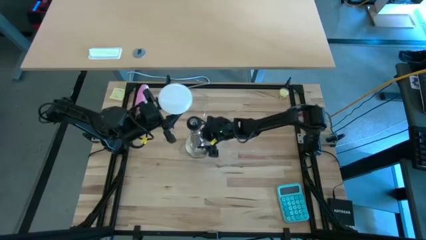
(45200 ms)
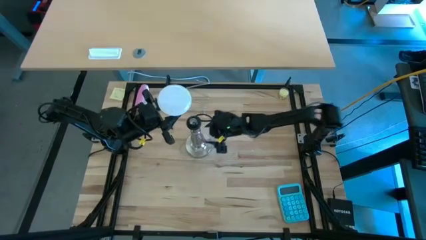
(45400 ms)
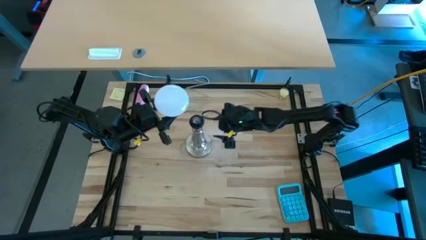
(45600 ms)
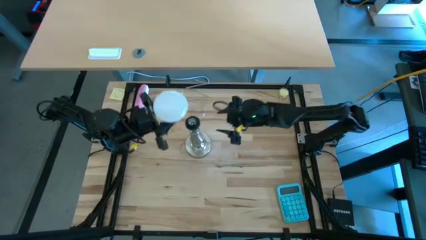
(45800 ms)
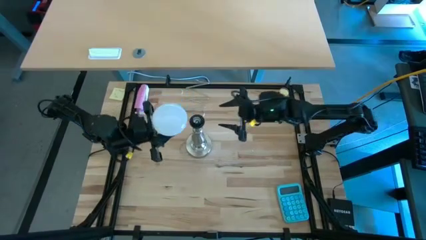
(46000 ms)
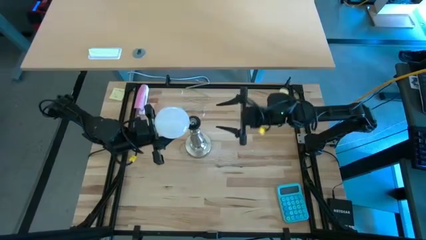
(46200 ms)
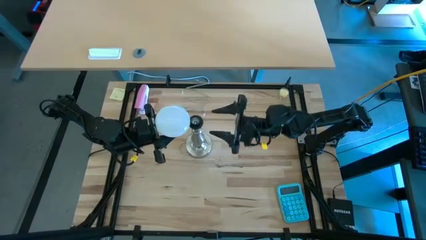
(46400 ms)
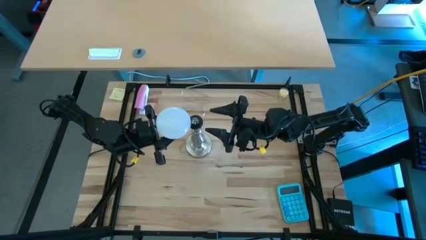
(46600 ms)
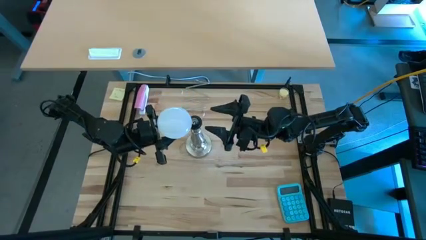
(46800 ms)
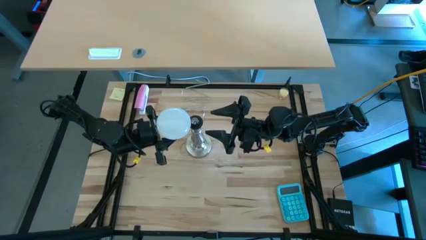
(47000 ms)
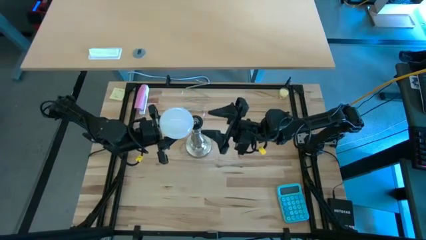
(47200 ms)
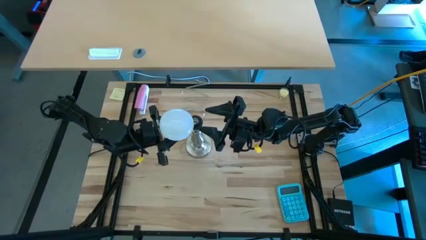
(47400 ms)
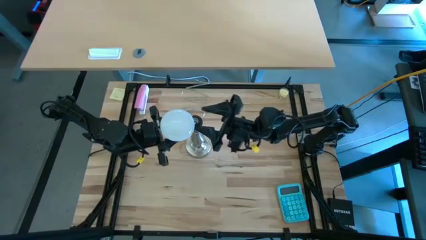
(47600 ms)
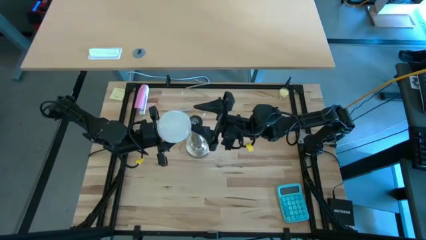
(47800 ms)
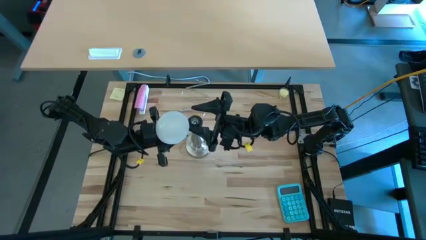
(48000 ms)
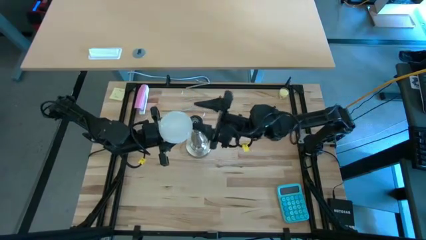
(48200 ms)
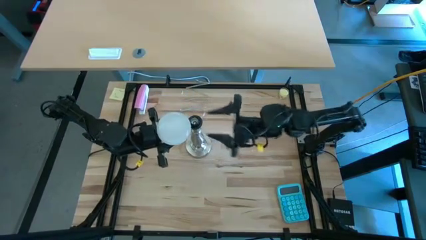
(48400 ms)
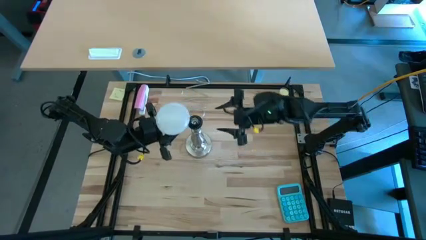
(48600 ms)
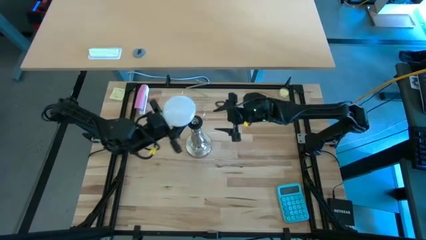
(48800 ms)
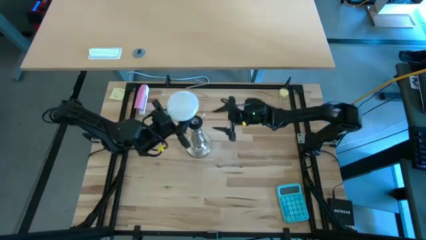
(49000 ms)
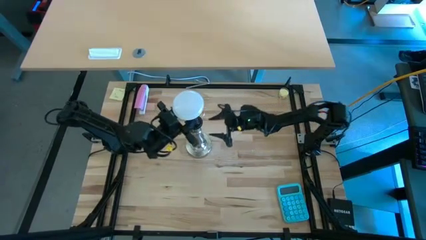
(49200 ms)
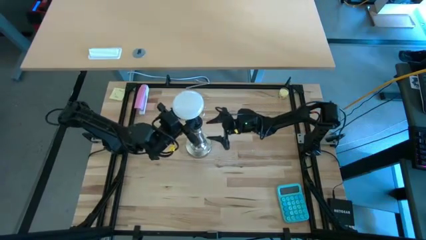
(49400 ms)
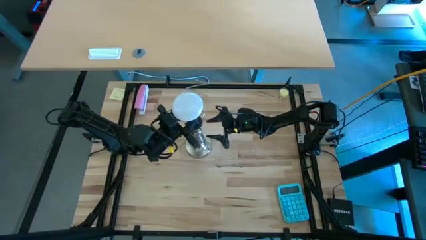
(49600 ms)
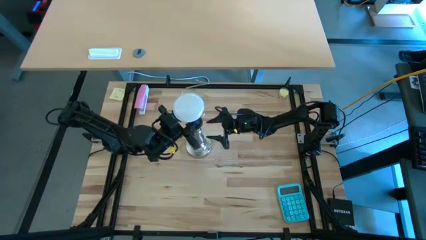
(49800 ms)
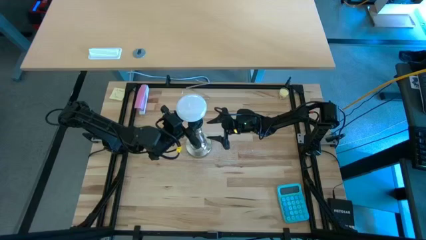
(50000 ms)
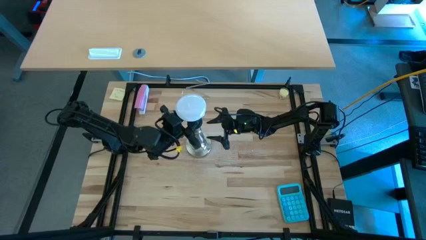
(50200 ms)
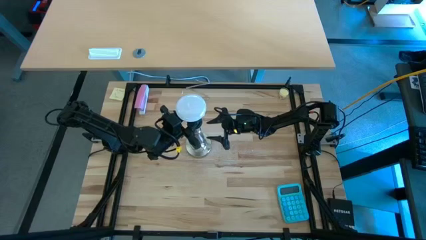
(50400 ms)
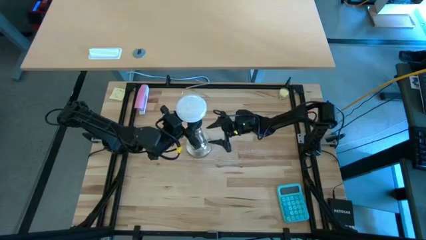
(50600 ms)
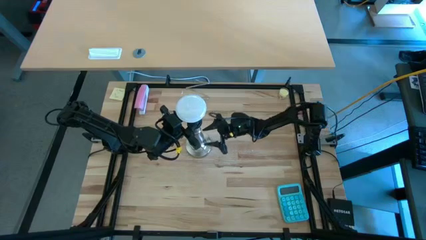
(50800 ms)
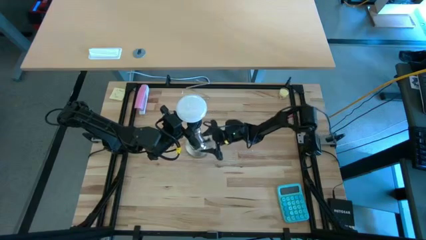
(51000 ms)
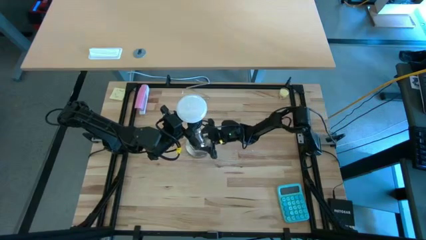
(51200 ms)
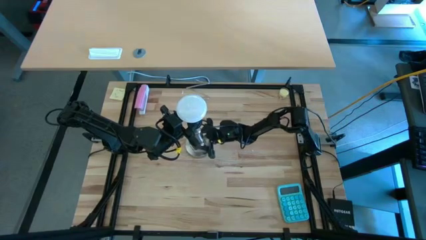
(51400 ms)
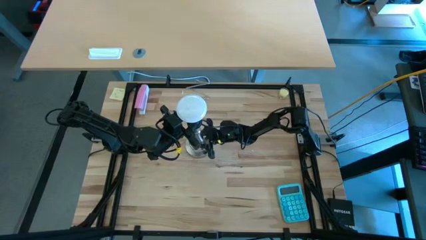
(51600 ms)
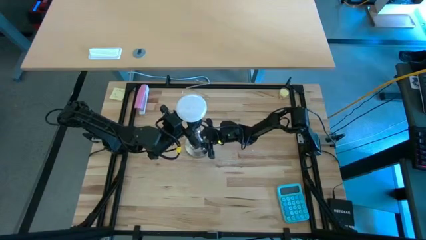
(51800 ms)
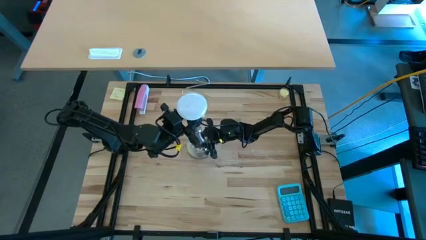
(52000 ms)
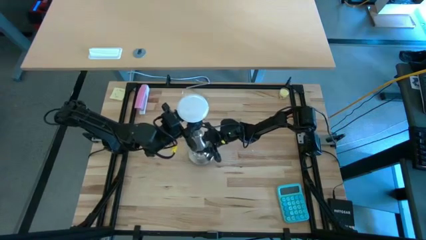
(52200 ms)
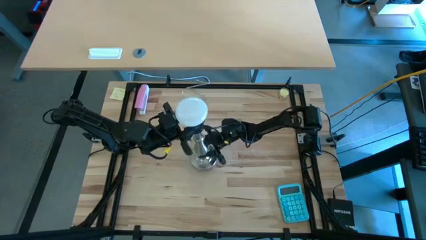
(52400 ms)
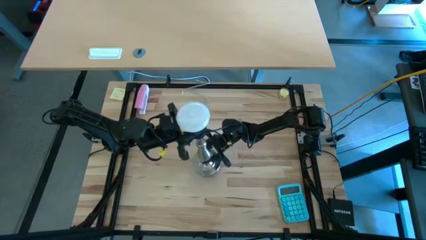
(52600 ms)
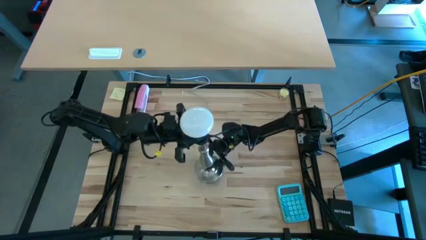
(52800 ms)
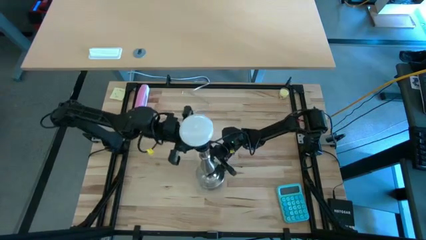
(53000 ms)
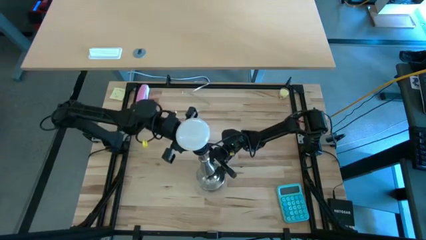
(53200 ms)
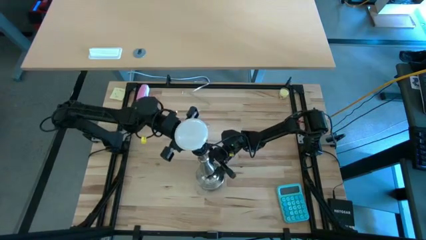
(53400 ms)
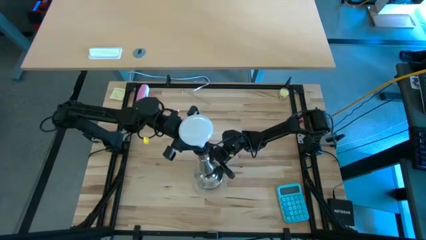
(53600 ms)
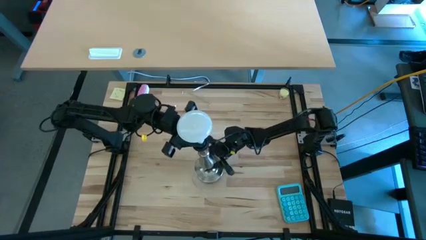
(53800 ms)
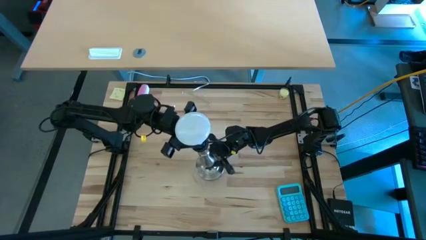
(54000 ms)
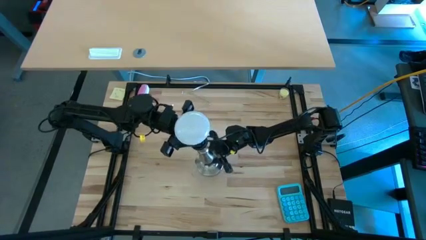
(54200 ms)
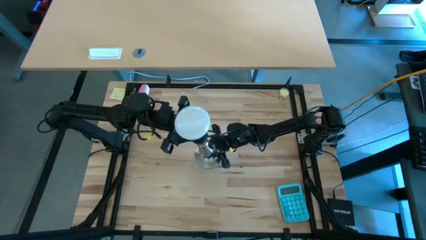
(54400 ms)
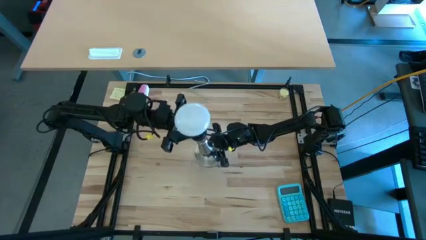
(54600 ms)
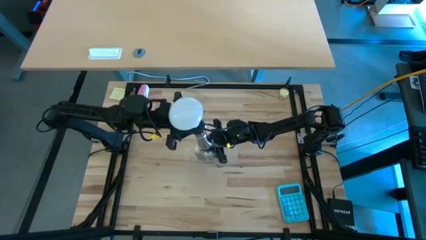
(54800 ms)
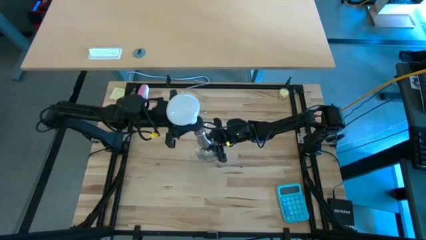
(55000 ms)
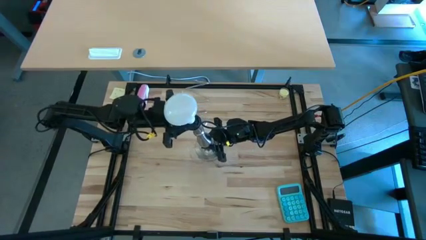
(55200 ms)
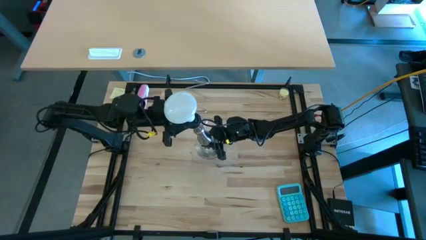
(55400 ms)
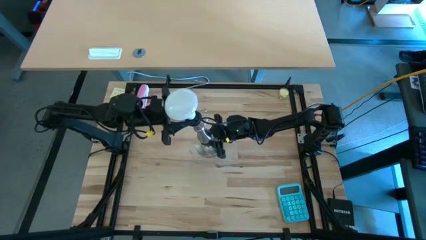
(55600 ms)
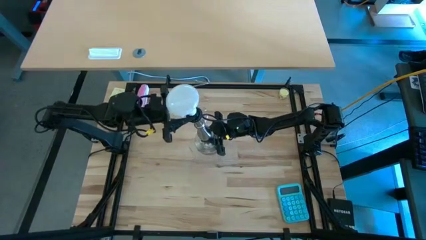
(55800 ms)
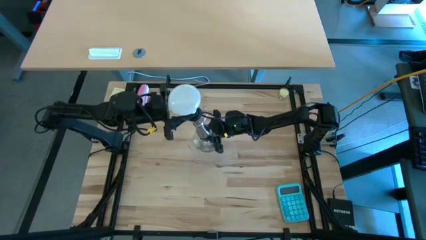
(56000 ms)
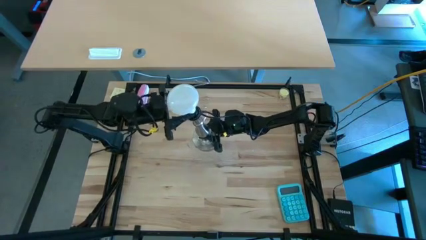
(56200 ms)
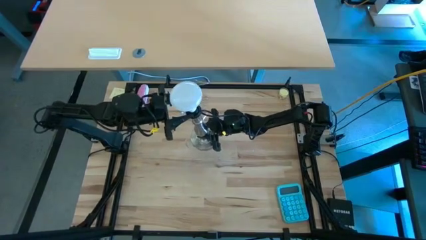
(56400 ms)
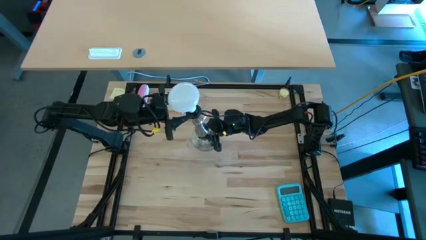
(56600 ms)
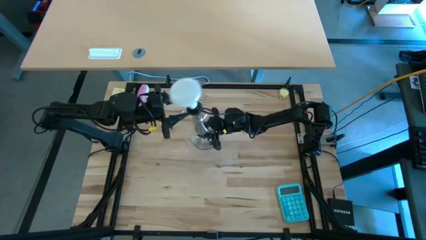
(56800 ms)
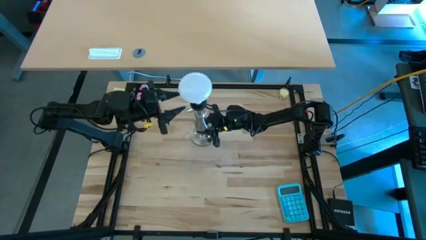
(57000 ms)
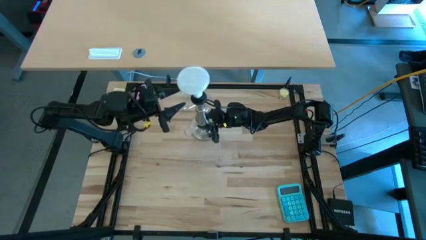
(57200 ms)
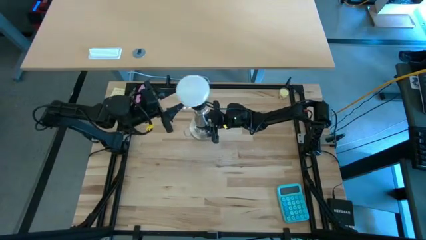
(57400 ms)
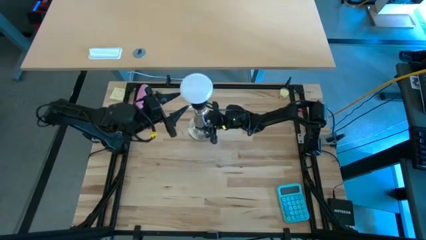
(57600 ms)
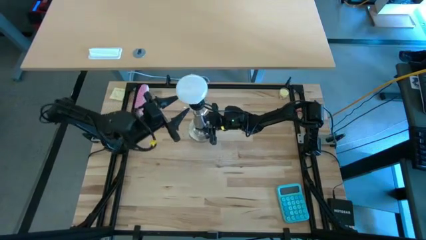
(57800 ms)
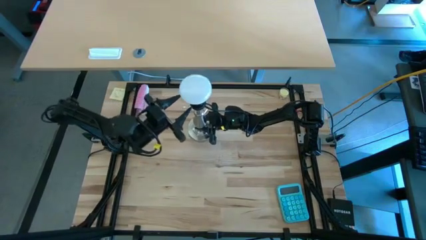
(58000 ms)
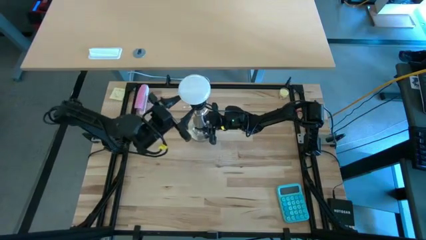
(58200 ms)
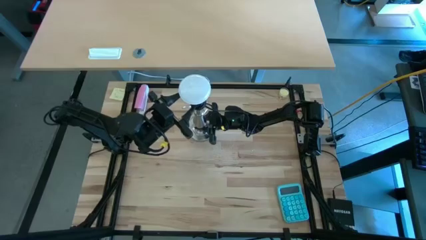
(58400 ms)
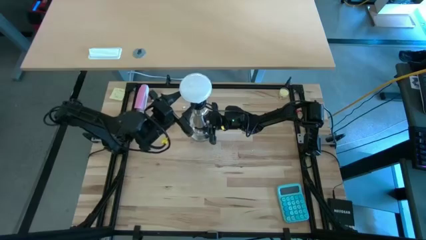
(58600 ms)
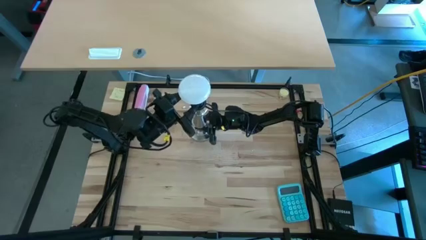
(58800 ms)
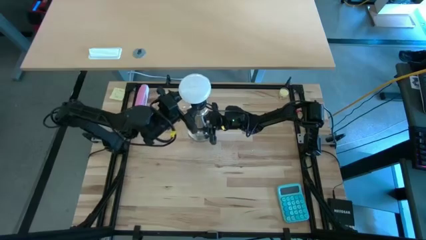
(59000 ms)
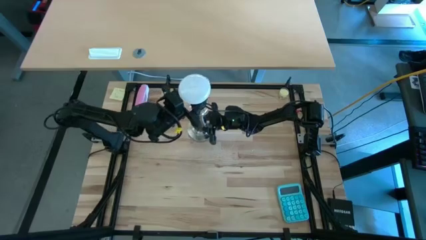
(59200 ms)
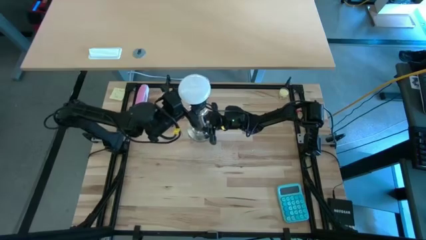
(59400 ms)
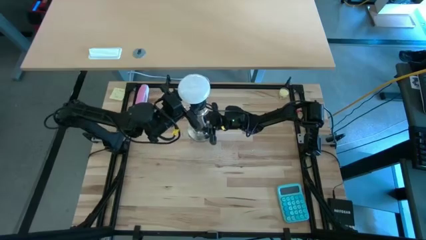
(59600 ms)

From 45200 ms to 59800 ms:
Task: Screw lightbulb
Insert the lightbulb into the desk lamp

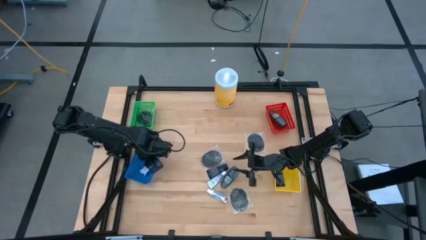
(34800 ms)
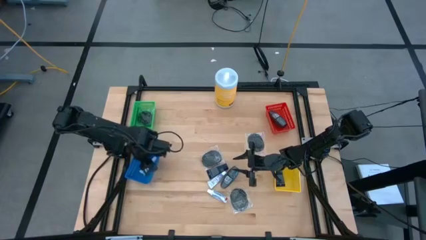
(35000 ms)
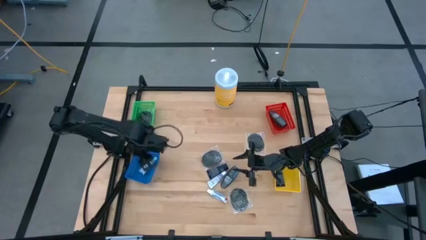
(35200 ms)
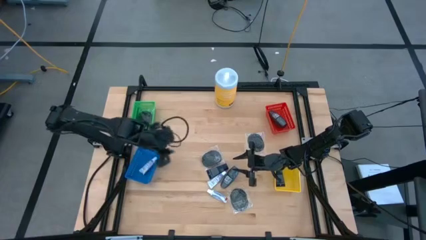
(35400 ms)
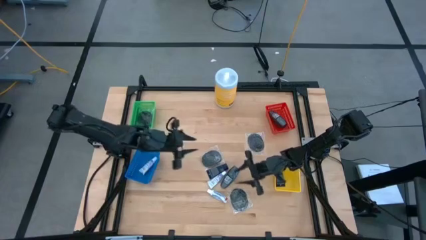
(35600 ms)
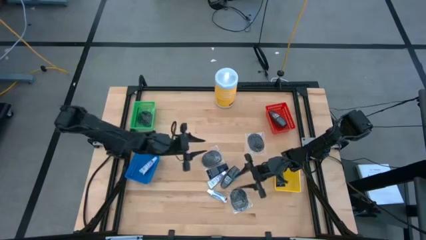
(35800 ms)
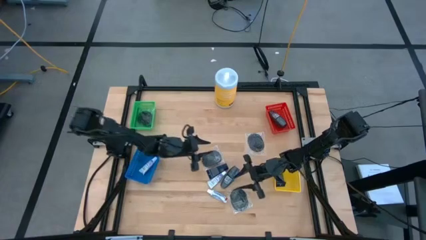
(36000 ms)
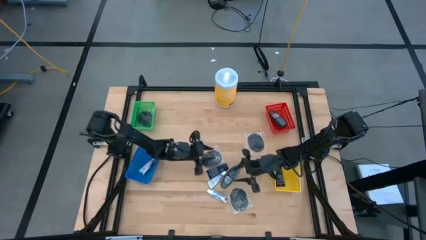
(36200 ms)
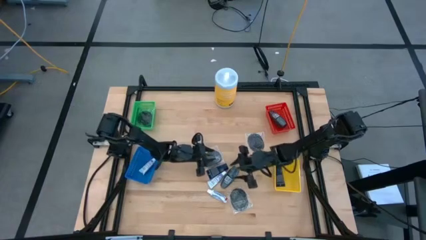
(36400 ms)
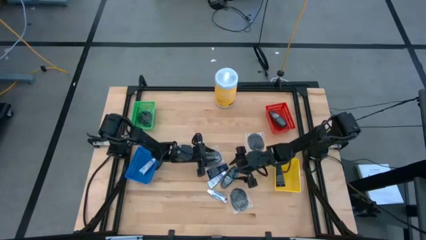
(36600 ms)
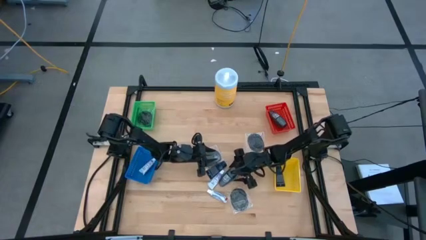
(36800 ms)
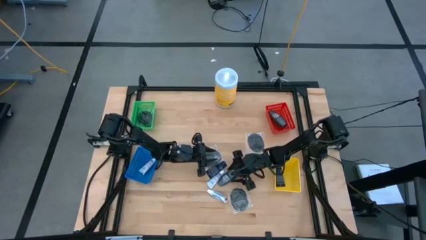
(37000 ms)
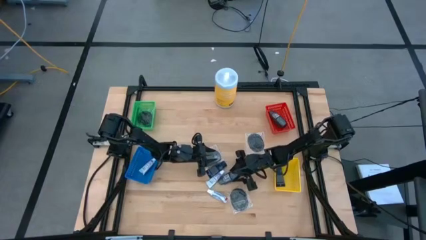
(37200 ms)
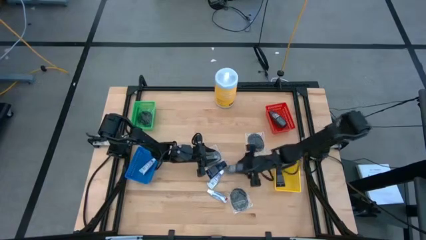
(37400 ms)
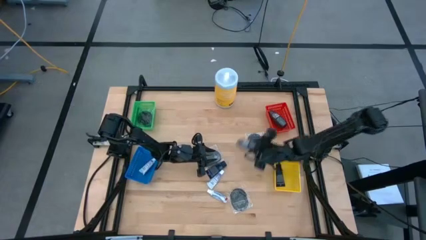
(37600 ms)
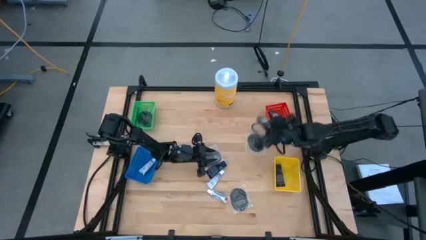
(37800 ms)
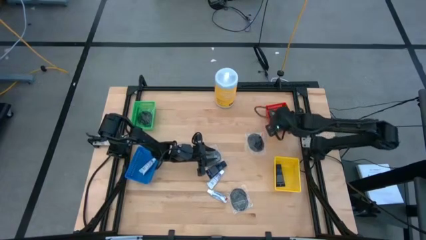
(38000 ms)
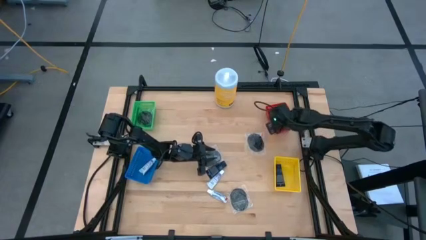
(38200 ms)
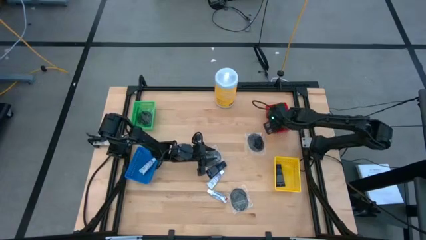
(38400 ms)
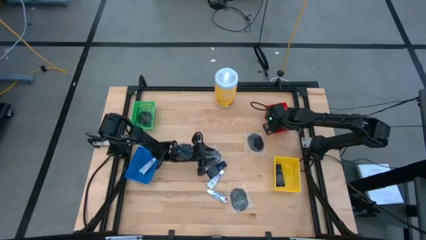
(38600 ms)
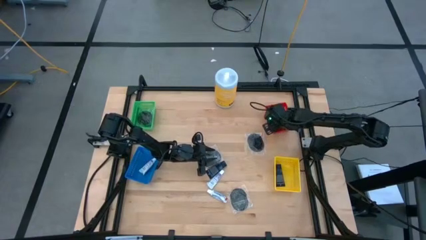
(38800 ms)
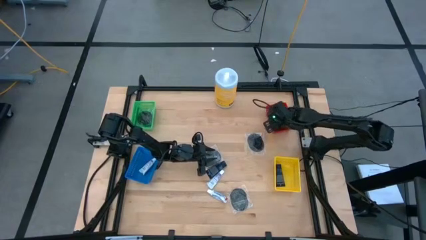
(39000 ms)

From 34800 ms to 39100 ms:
Task: Pick & Place Travel size toiletries
Put the deodorant into the red bin
